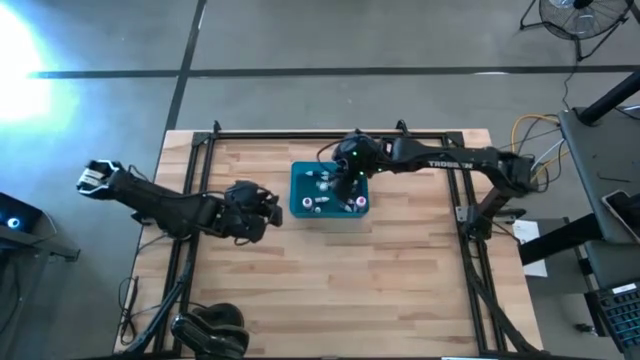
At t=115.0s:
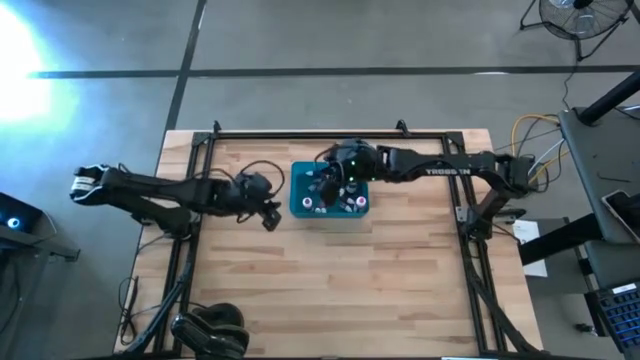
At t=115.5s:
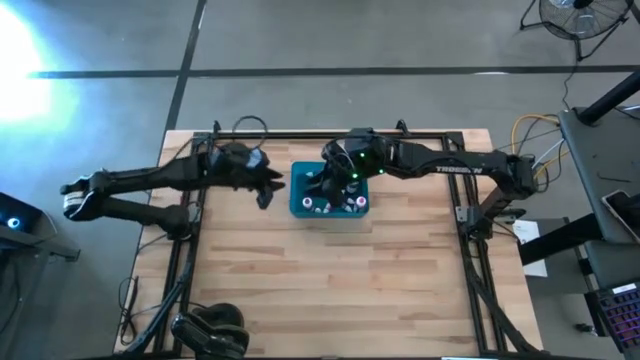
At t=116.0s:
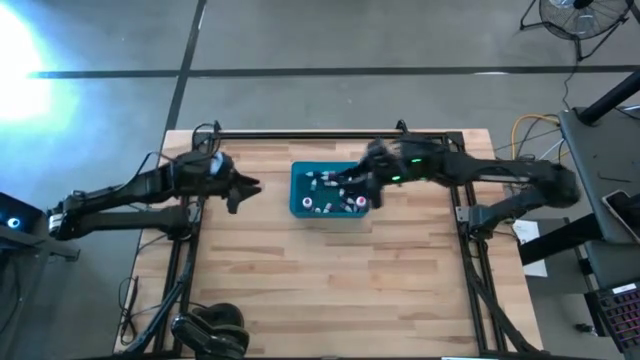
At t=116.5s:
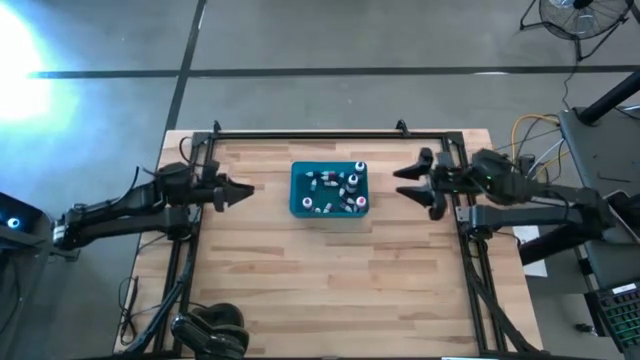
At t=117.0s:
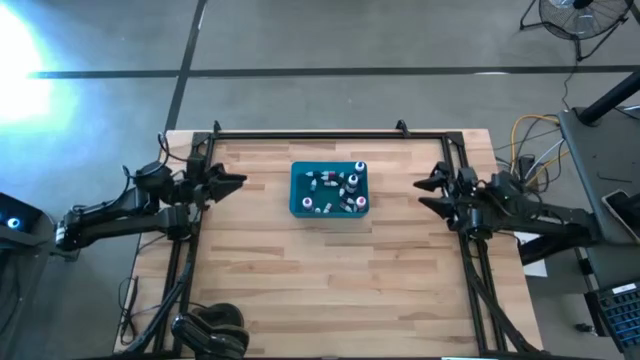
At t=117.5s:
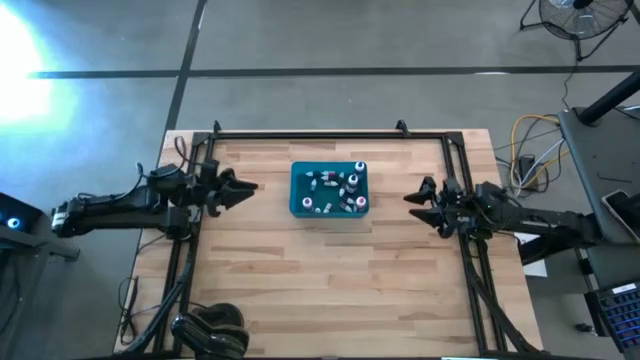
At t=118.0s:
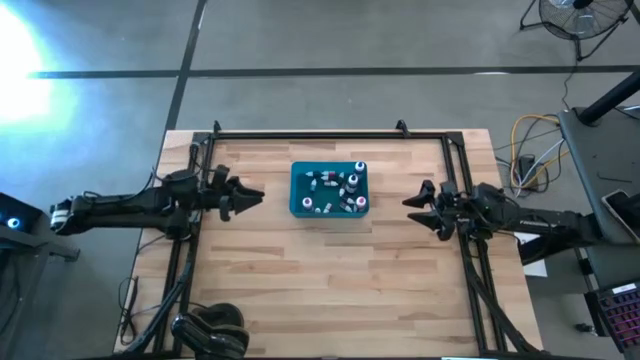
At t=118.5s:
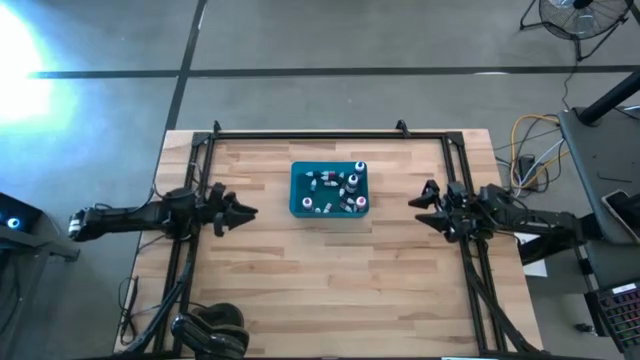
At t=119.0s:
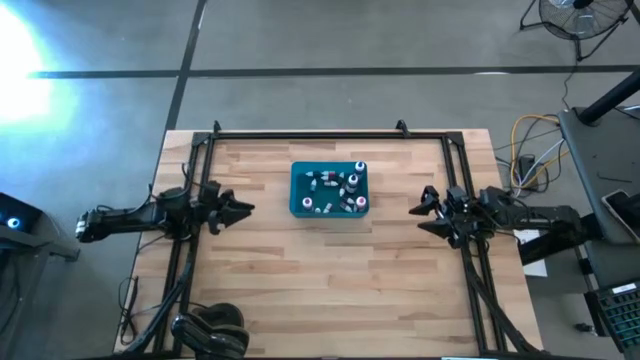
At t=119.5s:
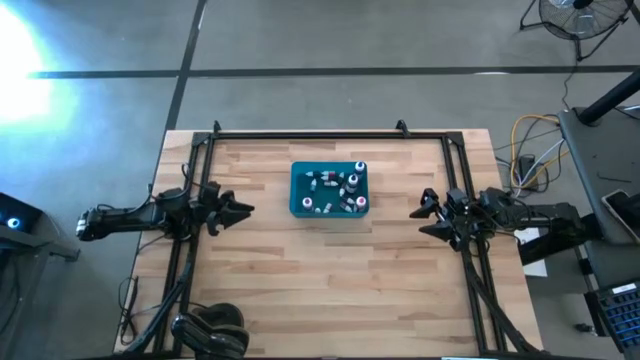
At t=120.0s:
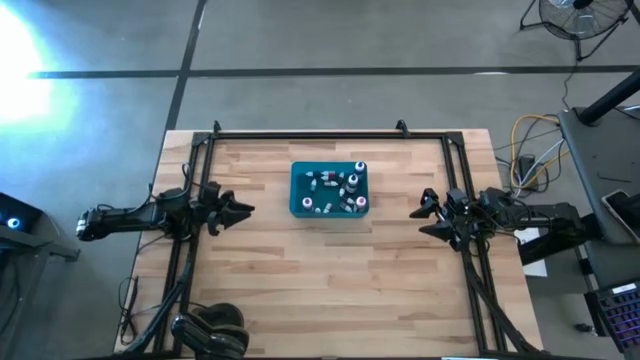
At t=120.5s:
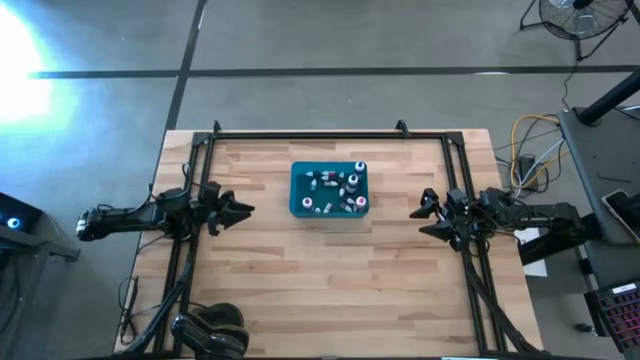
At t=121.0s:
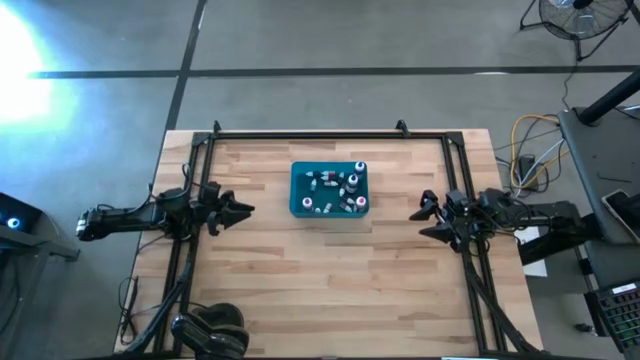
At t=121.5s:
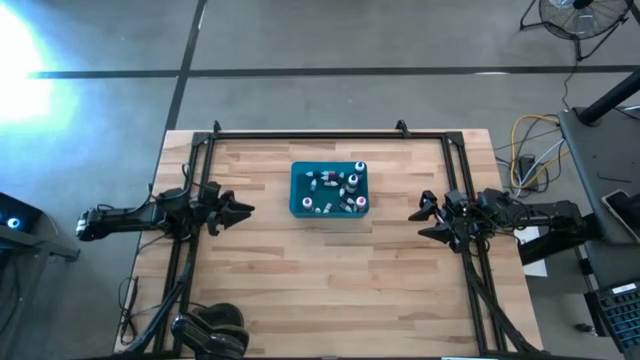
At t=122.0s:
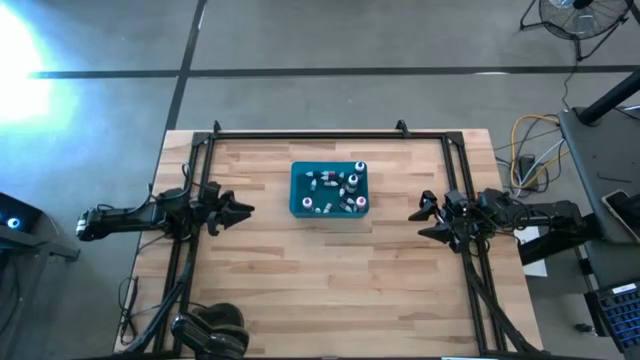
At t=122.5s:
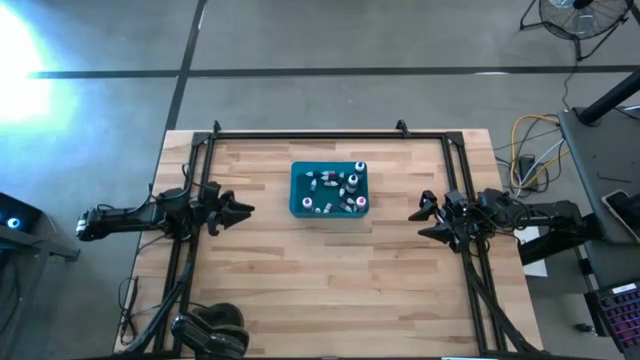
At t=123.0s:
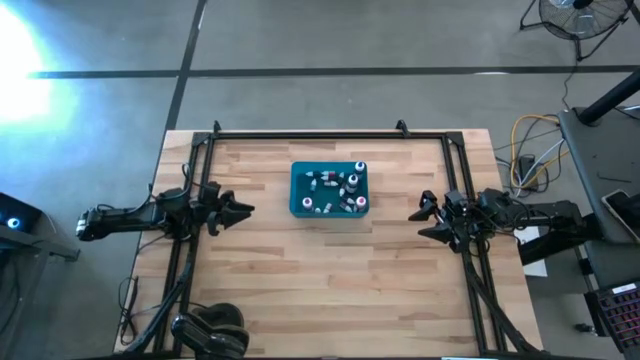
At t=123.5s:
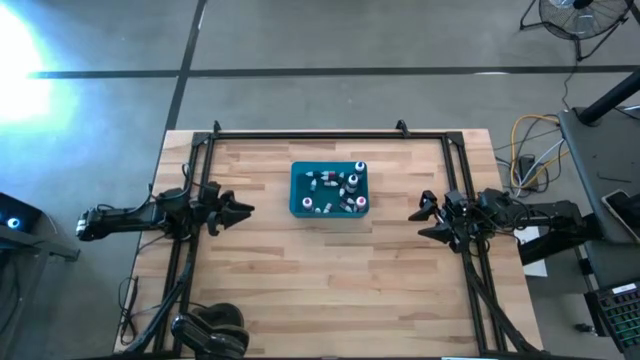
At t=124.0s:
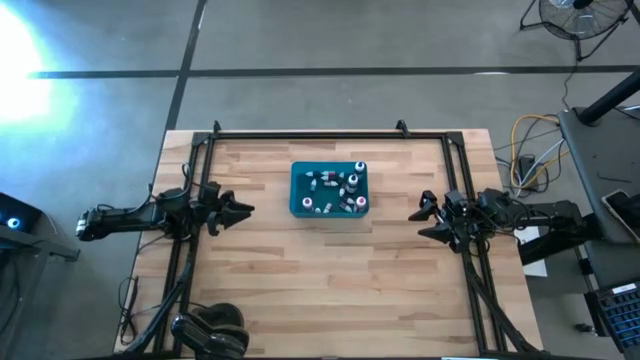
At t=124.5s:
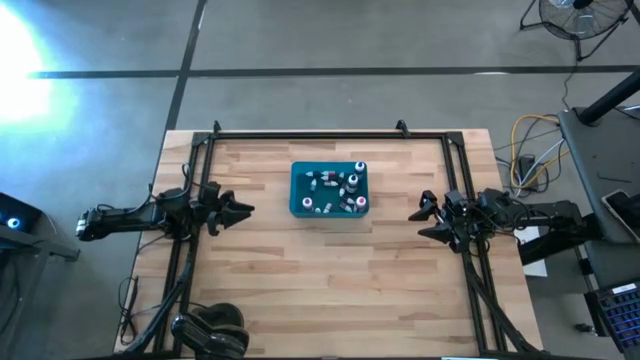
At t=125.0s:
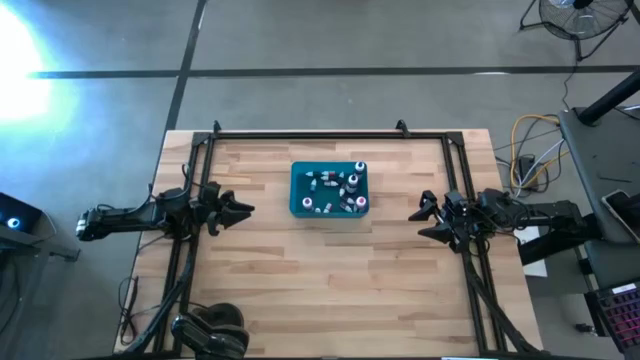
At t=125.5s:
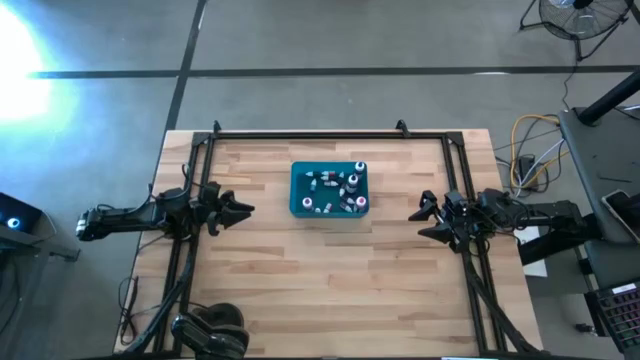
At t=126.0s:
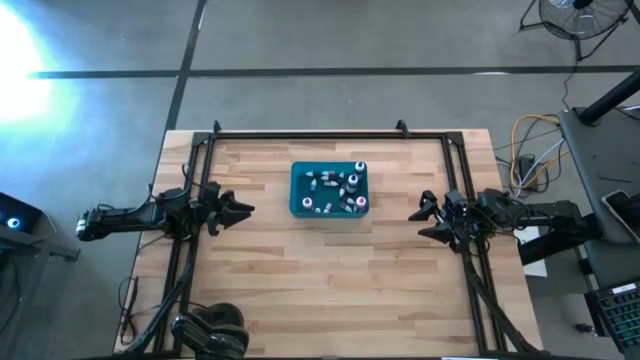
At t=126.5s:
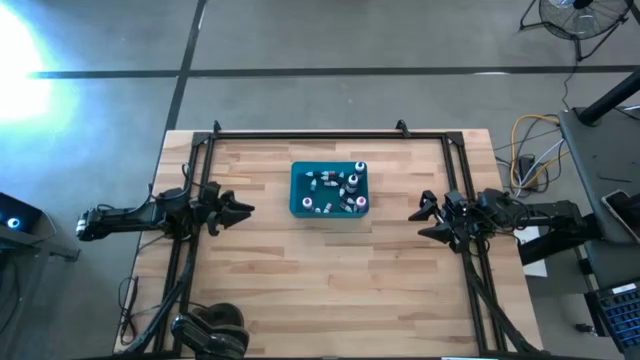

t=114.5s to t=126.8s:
Task: Pick & Place food coloring
Return to Home Position

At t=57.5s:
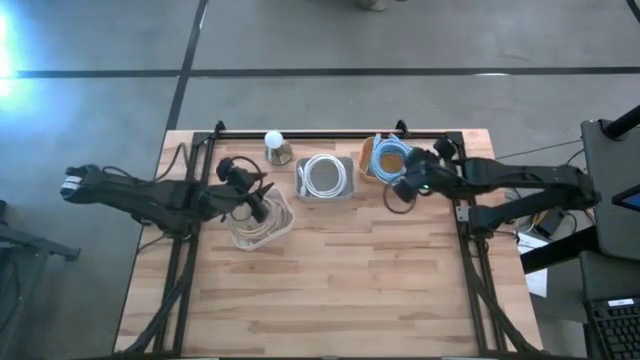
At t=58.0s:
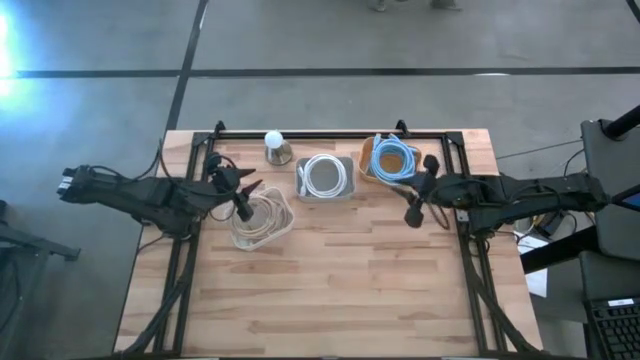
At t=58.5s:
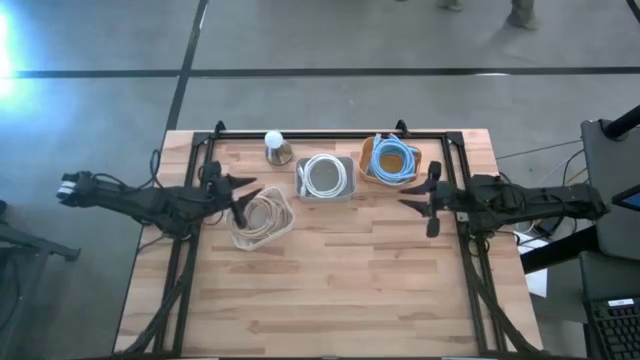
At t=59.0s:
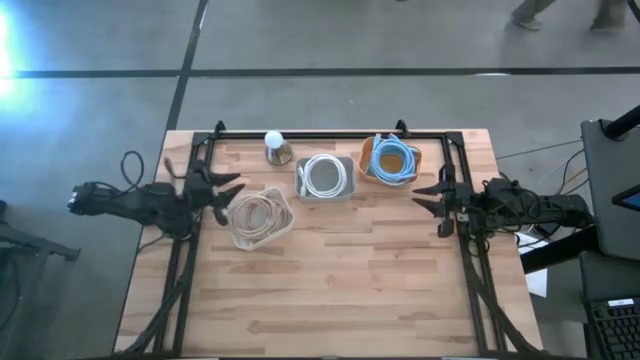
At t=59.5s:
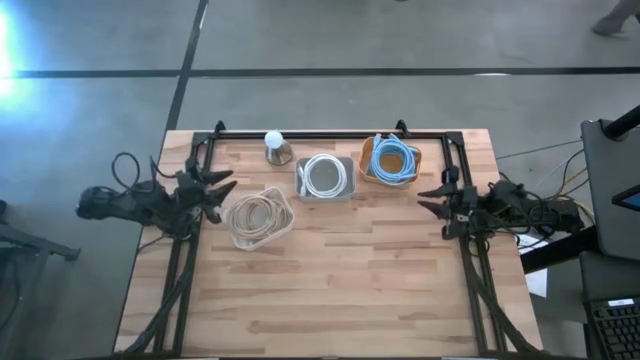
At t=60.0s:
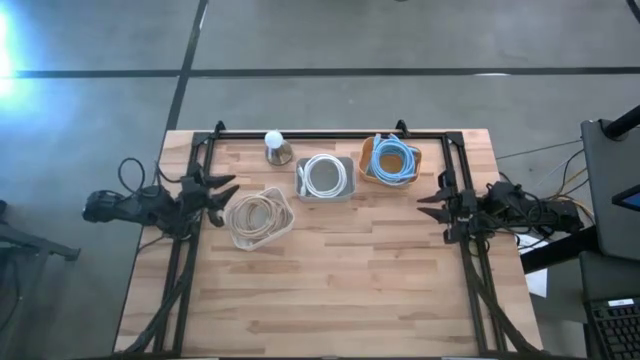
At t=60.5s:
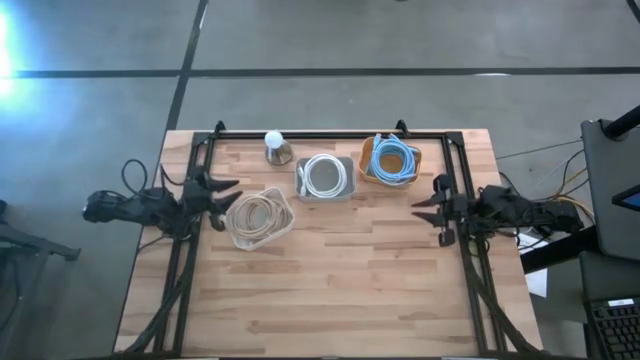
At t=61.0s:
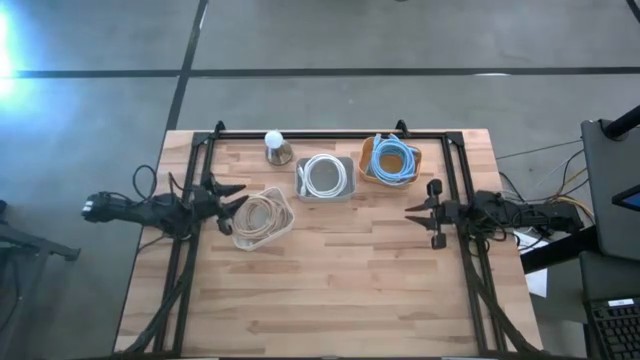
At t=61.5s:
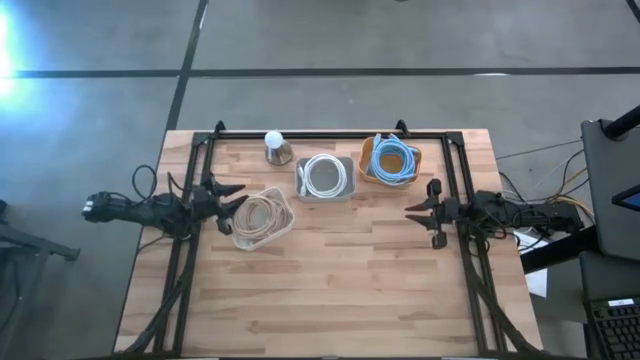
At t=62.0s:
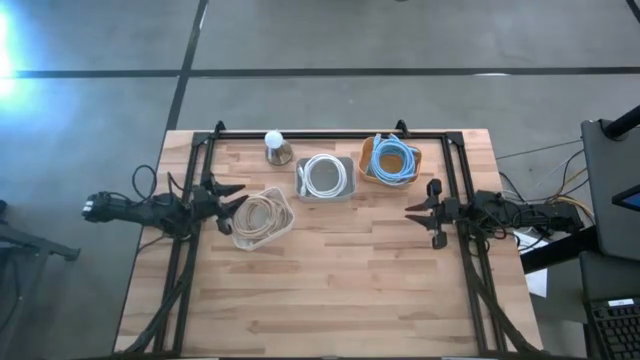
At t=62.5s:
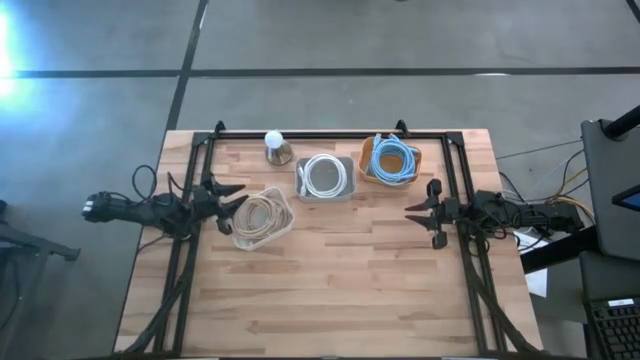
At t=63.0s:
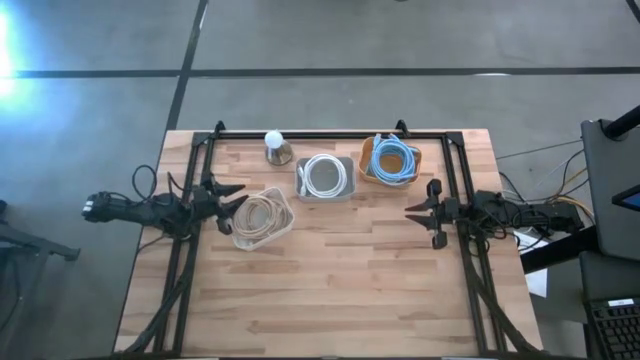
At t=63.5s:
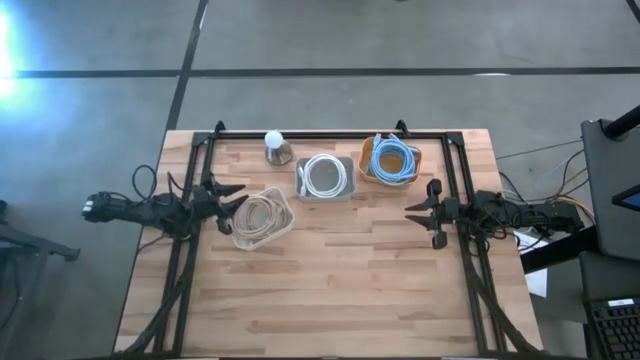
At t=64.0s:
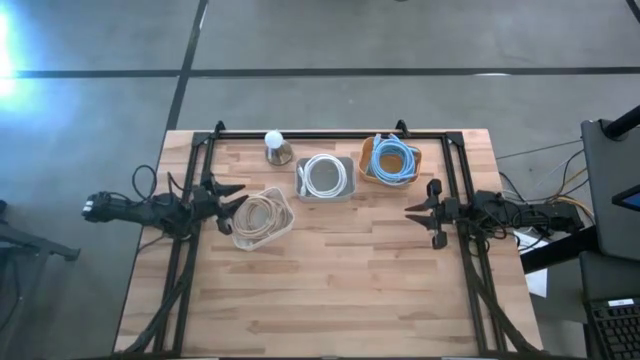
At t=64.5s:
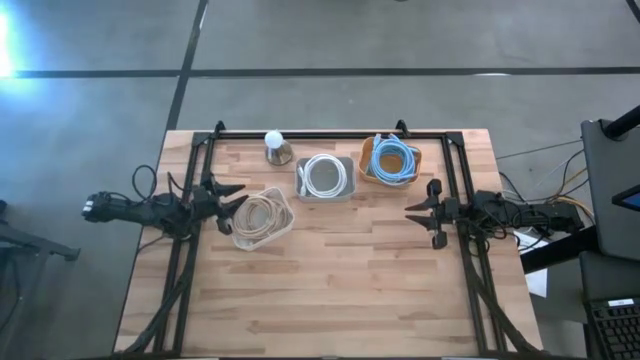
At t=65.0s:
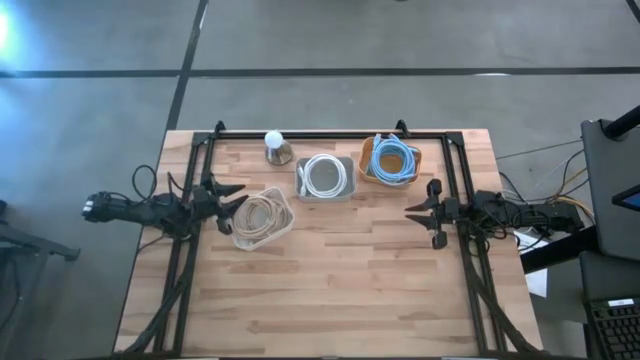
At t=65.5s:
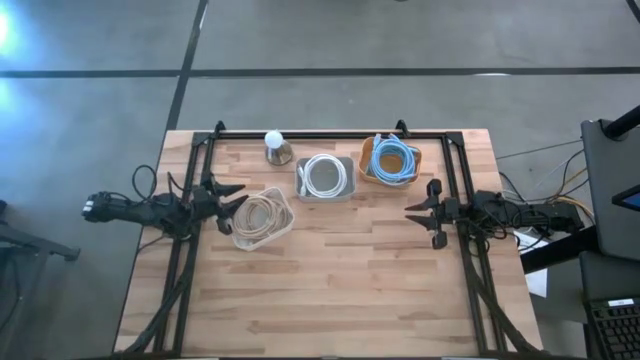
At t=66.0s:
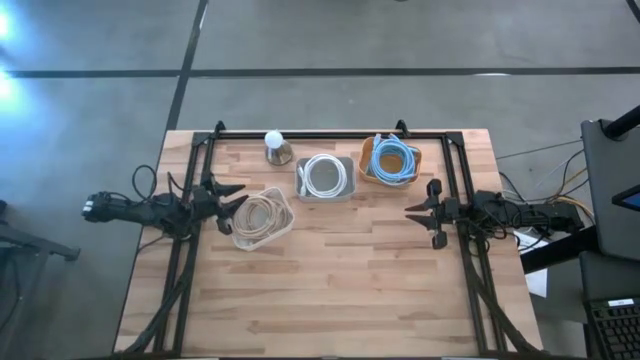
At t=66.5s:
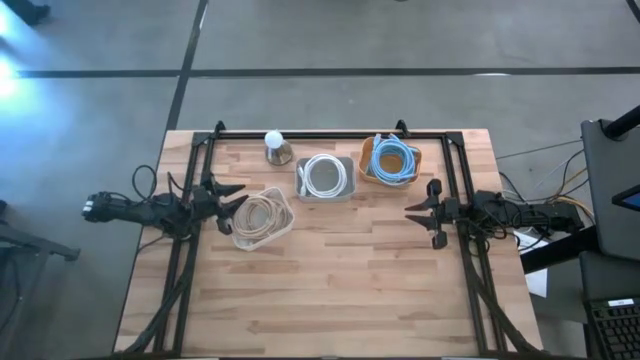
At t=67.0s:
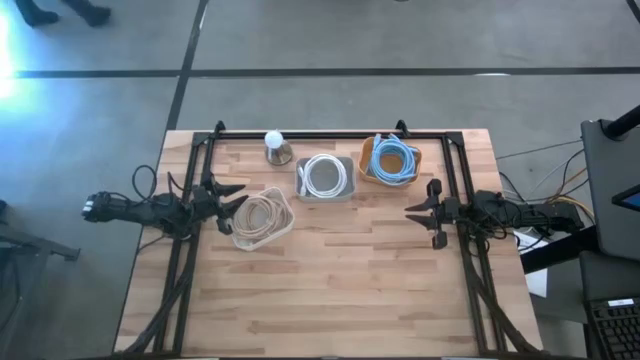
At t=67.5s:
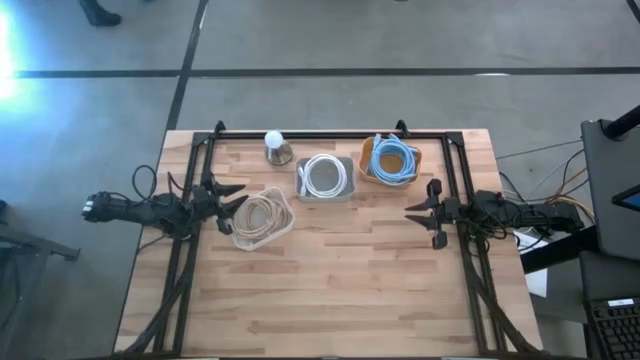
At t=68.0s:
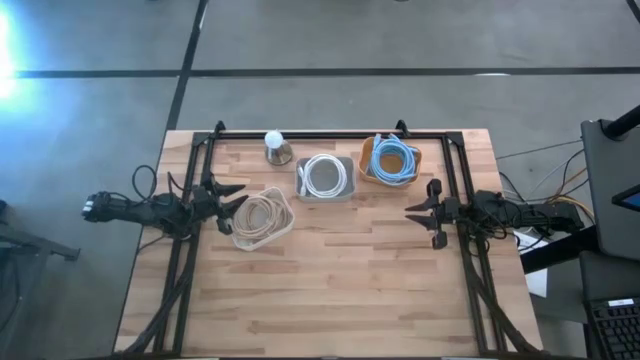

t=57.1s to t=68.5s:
Task: Sort HDMI cables
Return to Home Position
